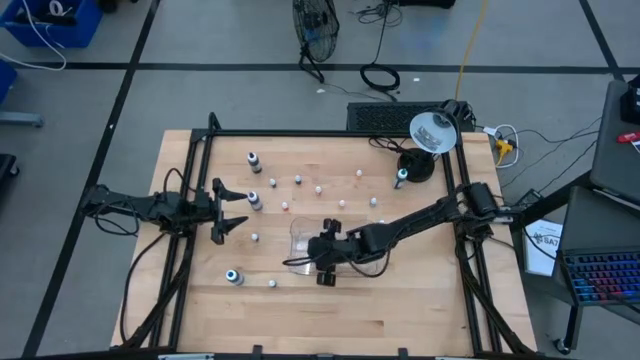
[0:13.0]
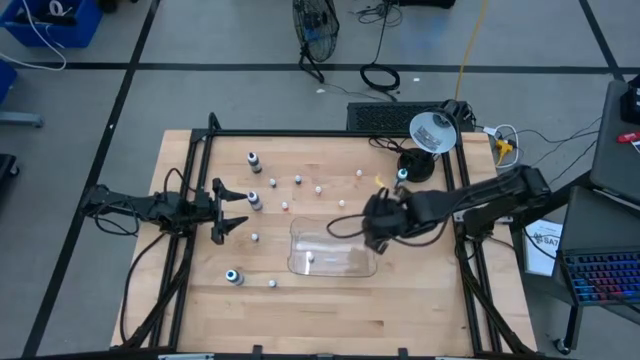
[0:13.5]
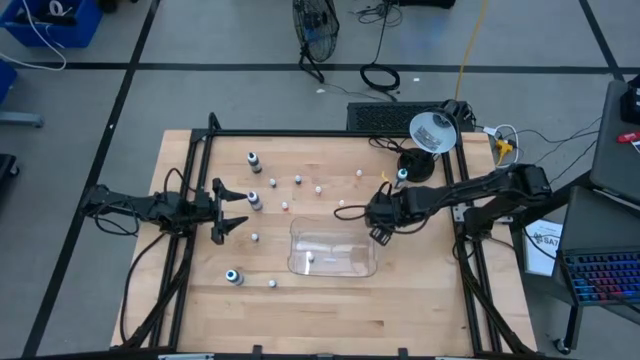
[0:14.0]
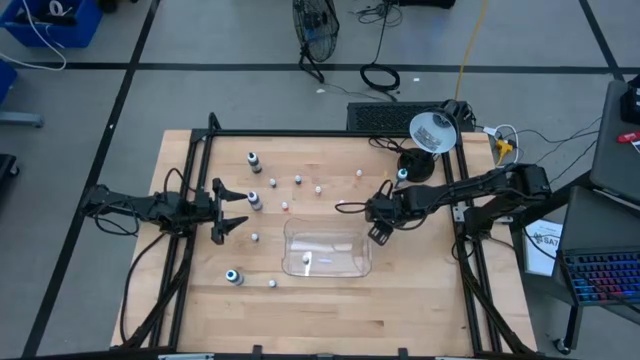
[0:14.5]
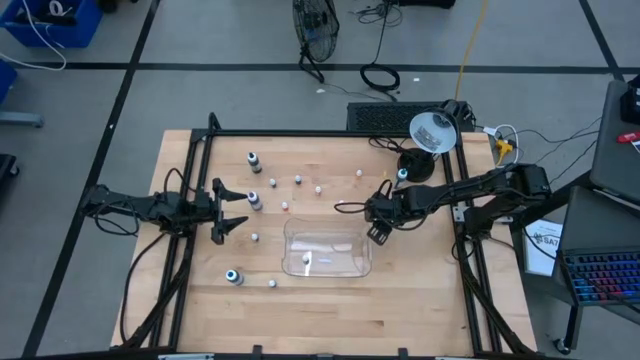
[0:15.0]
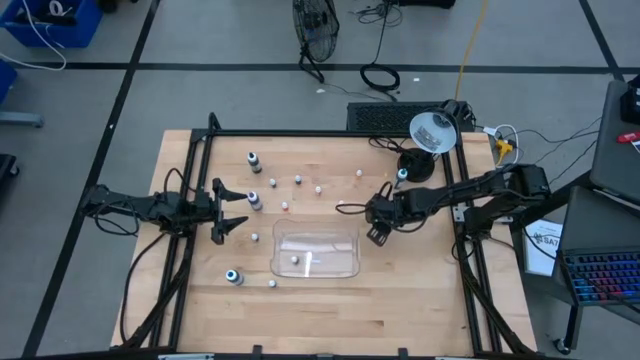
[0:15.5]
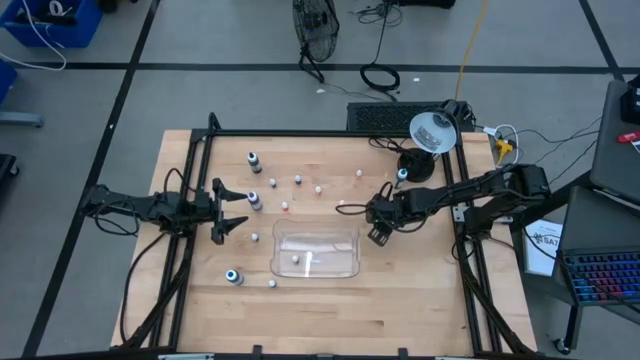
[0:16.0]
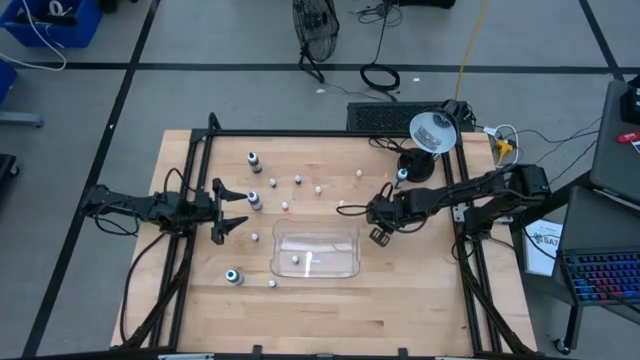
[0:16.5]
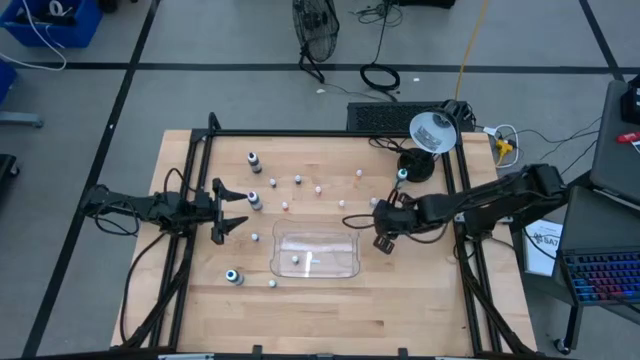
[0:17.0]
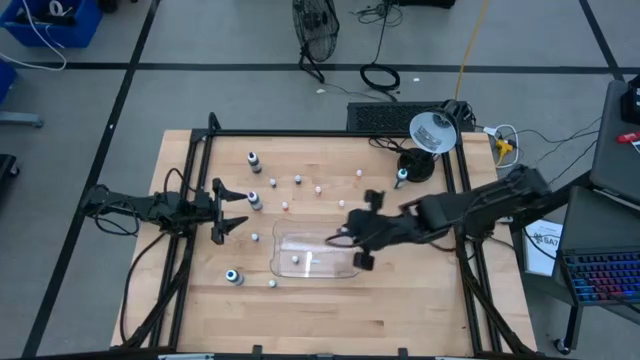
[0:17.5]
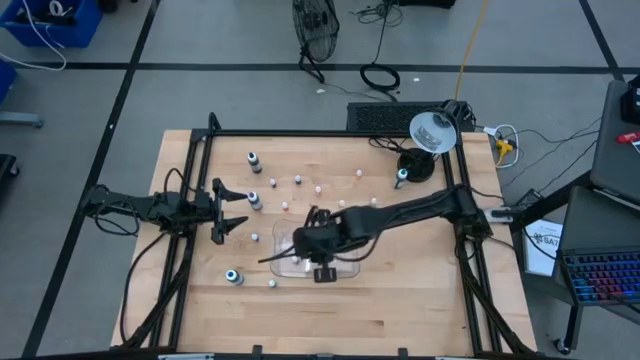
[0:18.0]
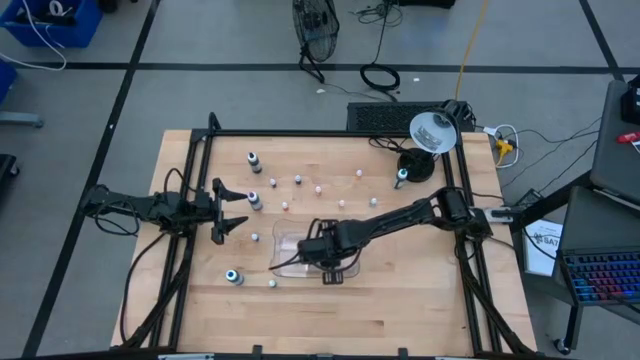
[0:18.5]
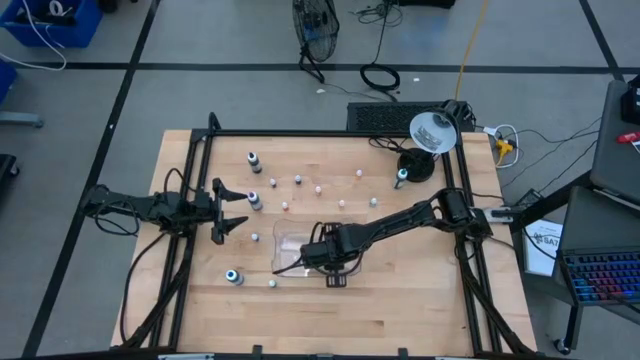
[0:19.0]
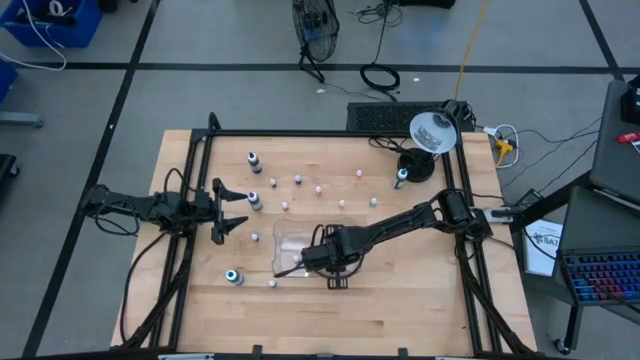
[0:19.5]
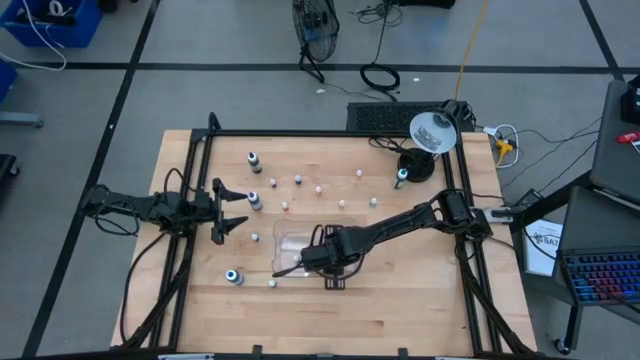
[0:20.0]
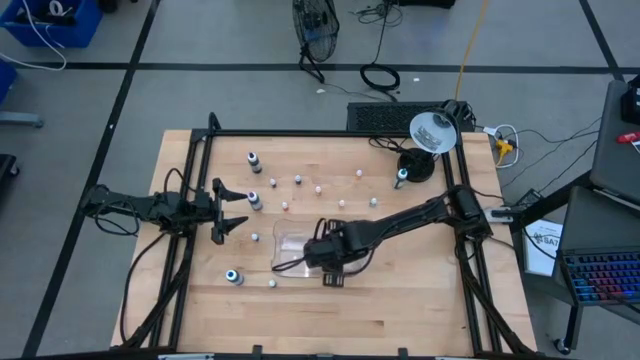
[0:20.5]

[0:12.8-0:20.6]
Task: Pick & Place food coloring
Put the right small purple food coloring bottle into the bin

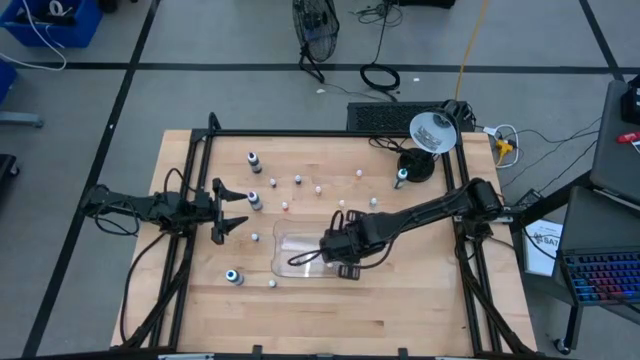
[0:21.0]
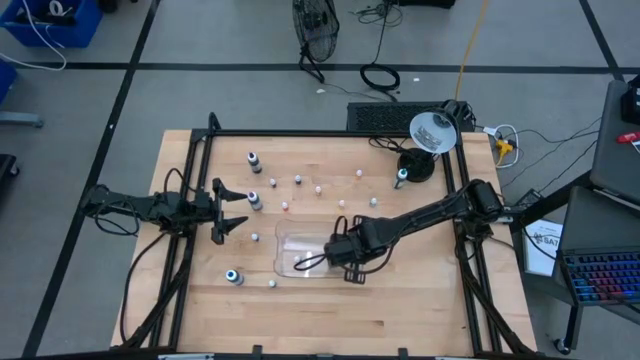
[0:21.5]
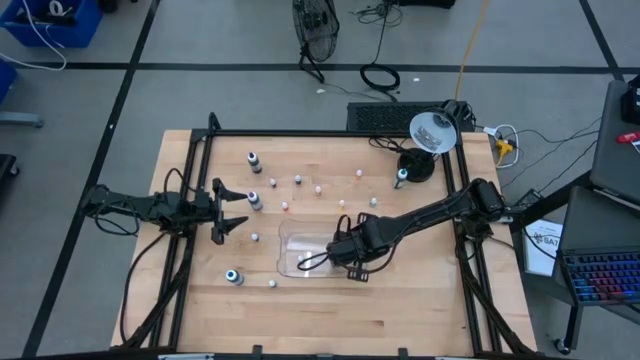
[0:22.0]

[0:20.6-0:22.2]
Adjust the bin

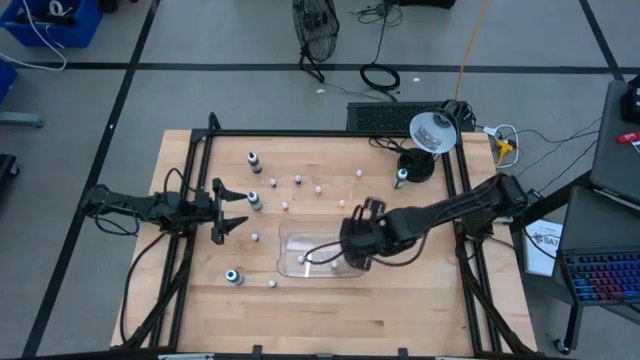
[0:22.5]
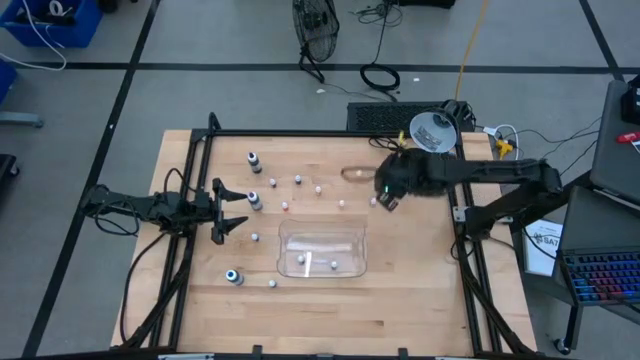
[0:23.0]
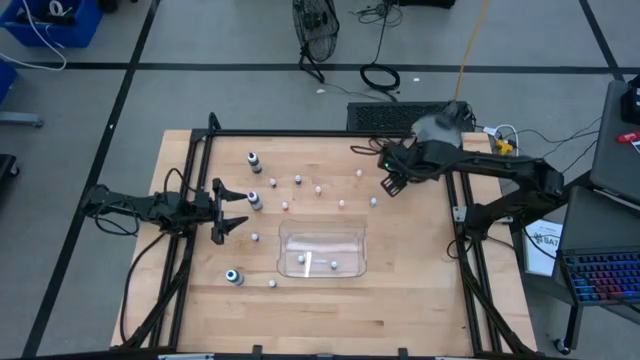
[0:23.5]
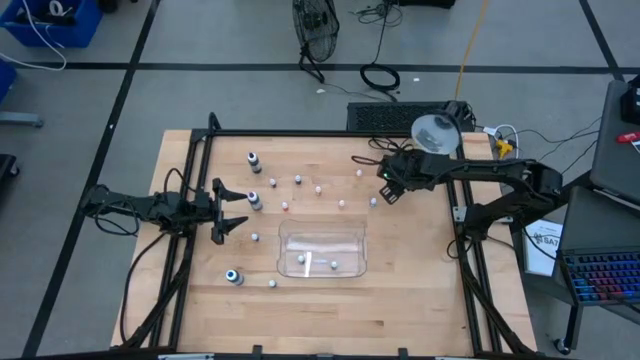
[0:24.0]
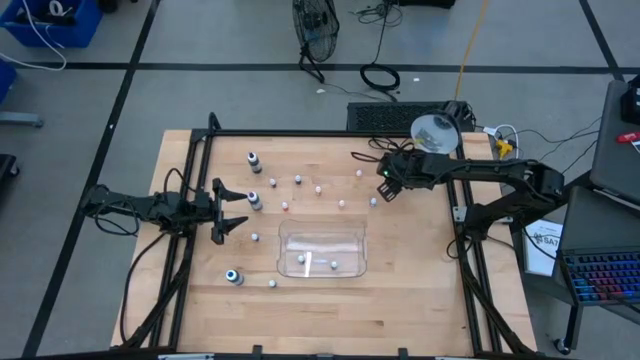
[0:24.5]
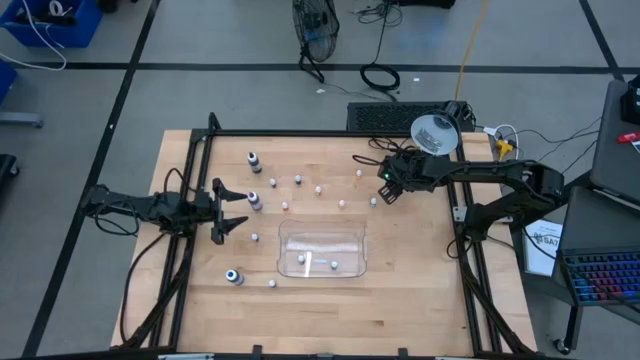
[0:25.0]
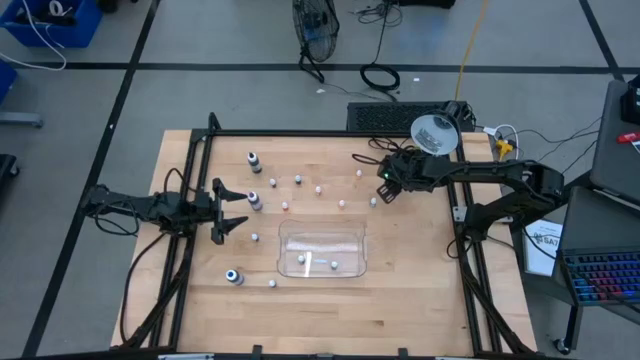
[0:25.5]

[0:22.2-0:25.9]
Put the big green food coloring bottle into the bin

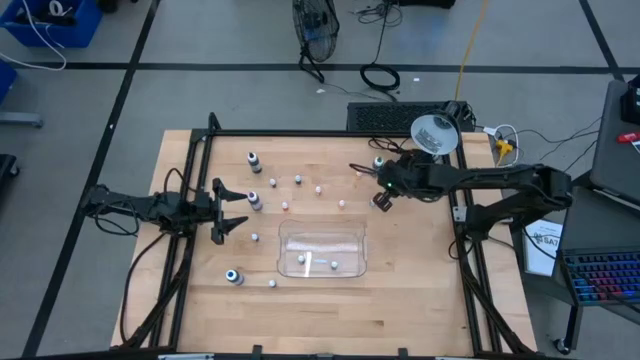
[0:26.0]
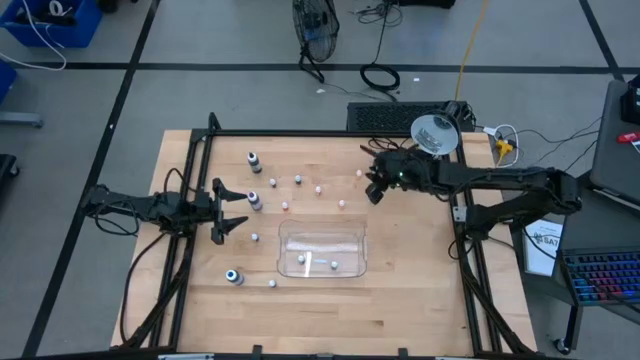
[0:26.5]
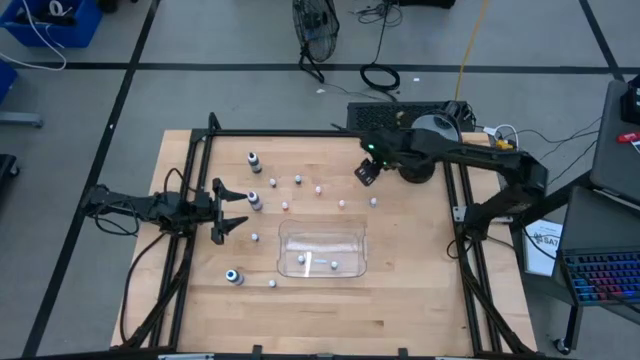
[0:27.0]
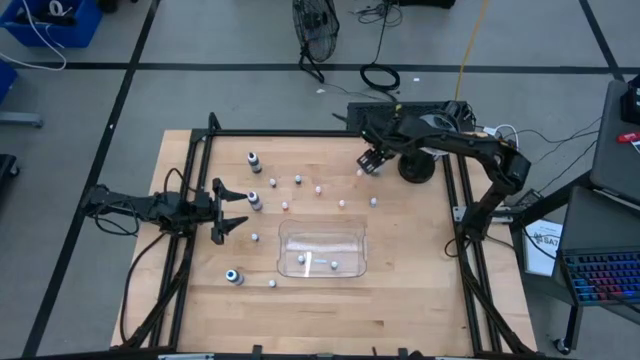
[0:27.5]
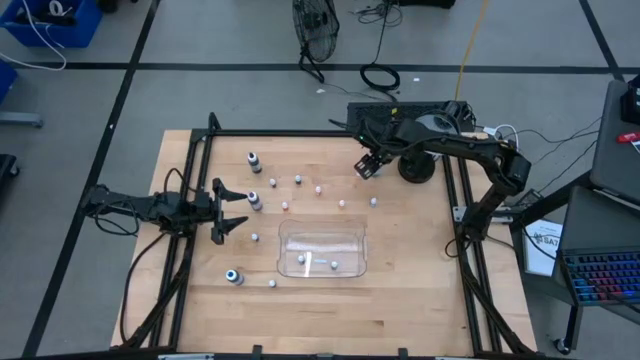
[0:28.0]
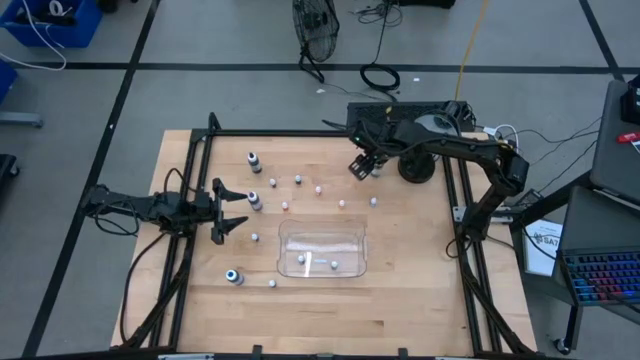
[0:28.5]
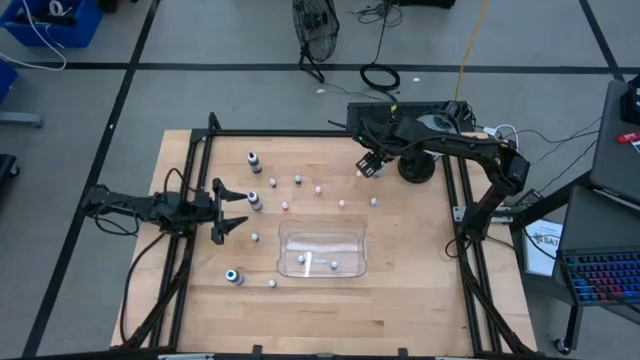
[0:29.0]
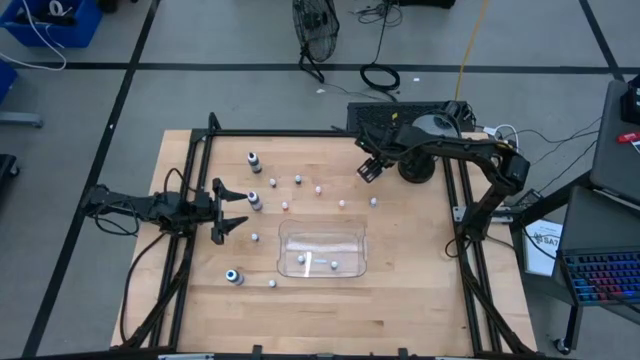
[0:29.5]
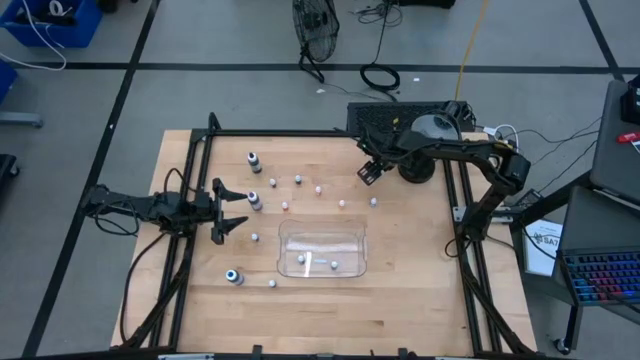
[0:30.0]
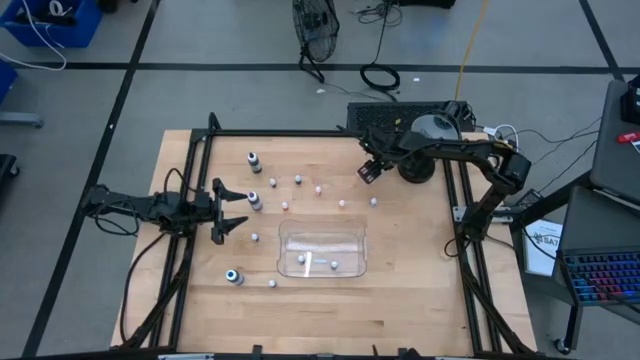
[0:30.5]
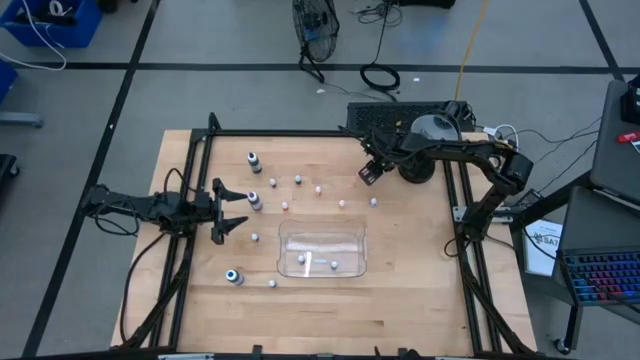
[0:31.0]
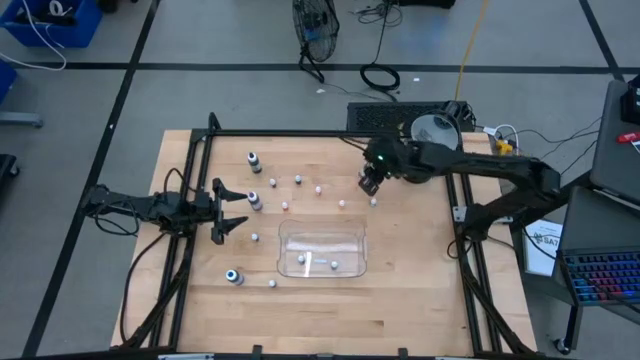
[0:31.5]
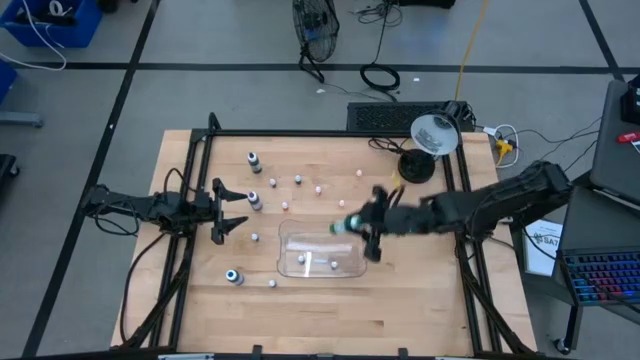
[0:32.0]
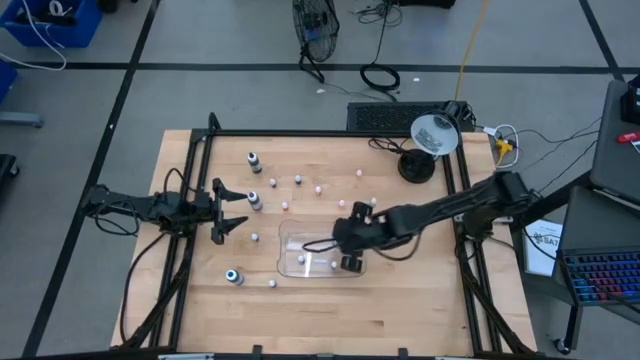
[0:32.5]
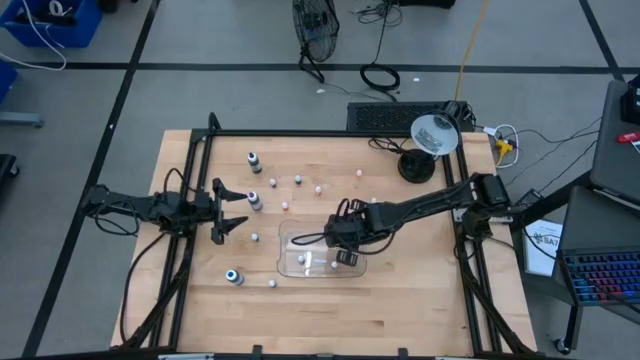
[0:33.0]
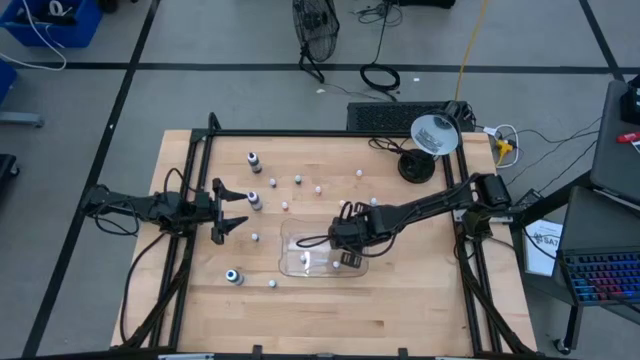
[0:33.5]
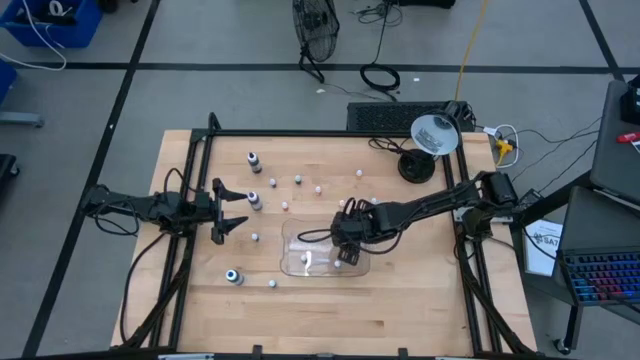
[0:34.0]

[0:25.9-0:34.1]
Put the big green food coloring bottle into the bin

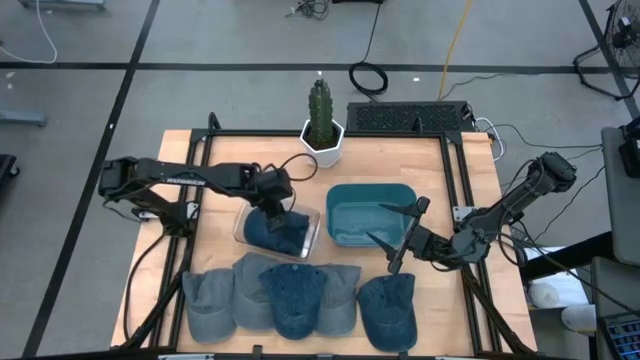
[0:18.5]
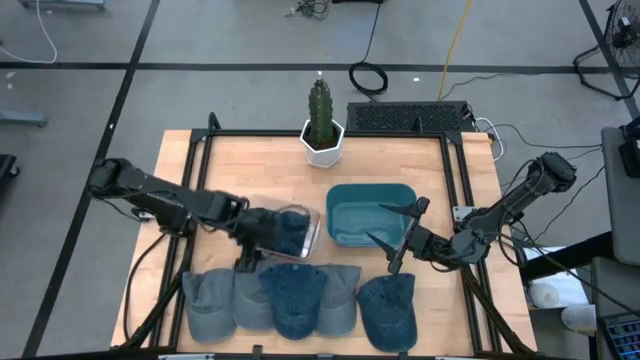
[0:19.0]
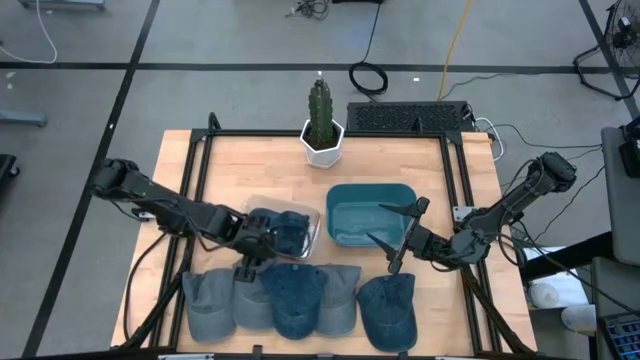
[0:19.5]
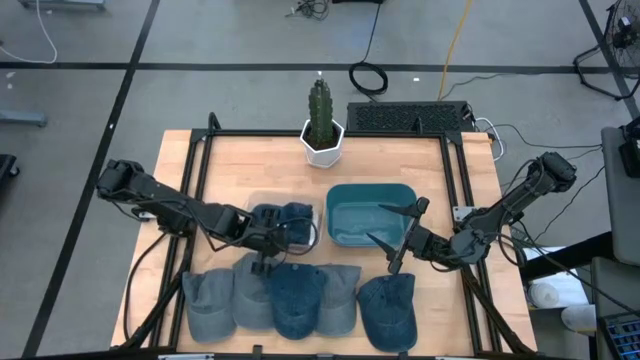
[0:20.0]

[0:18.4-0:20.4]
Task: Pick & Place hat
Adjust the transparent bin
